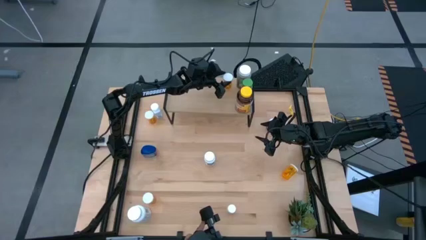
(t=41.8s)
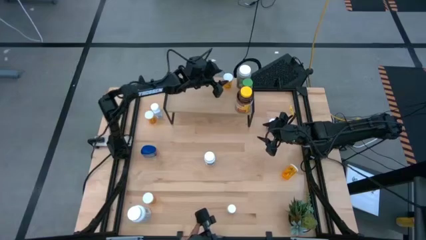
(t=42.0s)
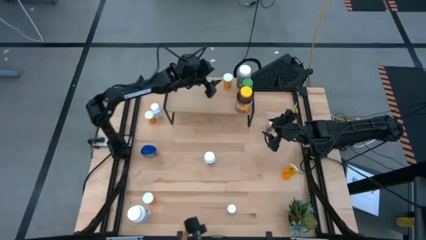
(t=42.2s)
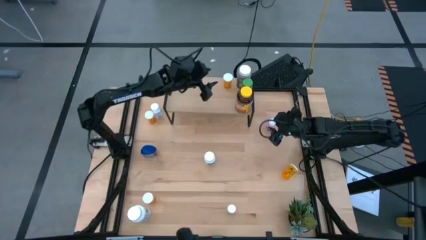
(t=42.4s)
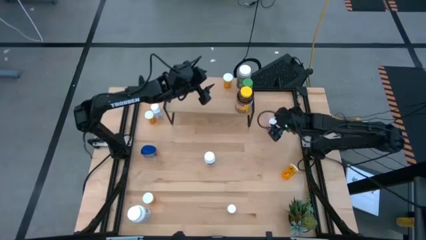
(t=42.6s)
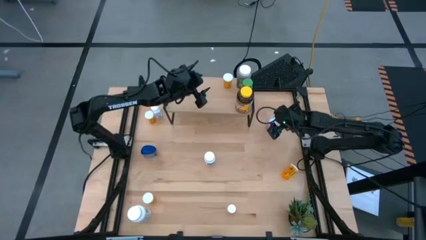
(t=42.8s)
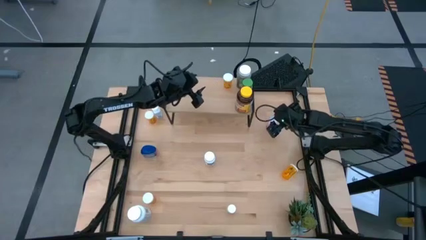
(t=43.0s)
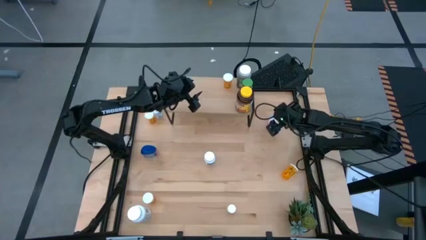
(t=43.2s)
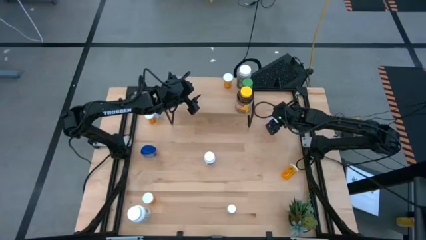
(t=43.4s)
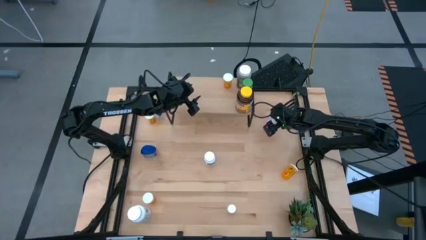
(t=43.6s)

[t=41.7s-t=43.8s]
Task: Pick and place medicine bottles onto shelf by color
Put the pink pill bottle on the shelf

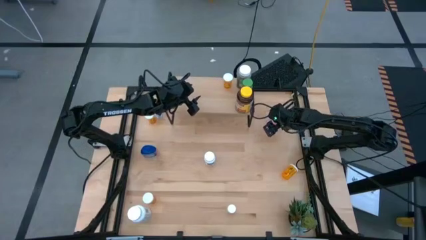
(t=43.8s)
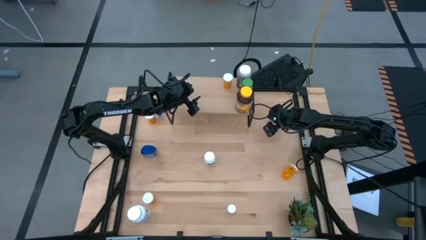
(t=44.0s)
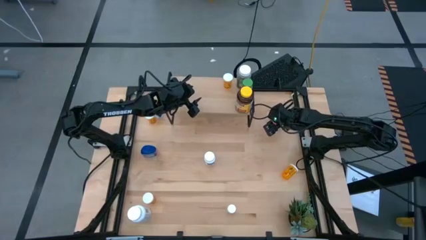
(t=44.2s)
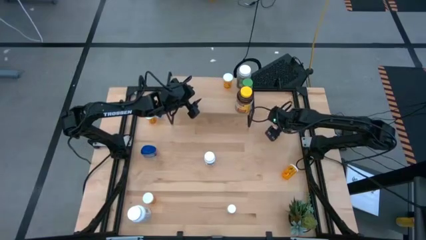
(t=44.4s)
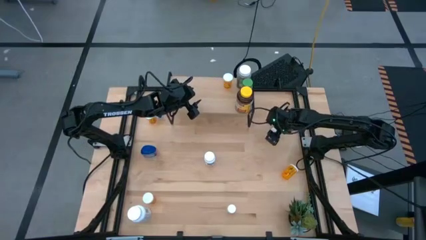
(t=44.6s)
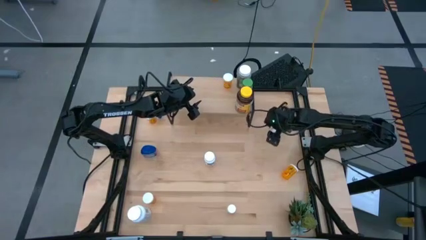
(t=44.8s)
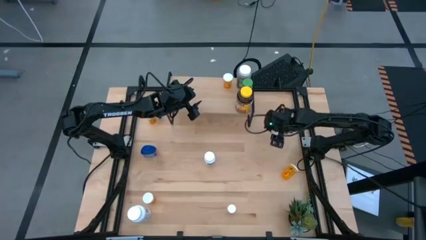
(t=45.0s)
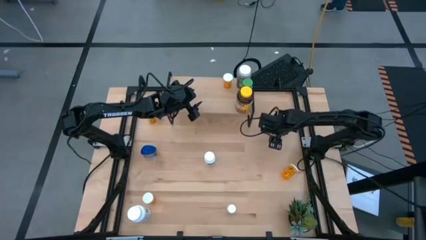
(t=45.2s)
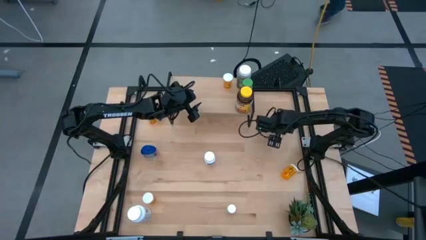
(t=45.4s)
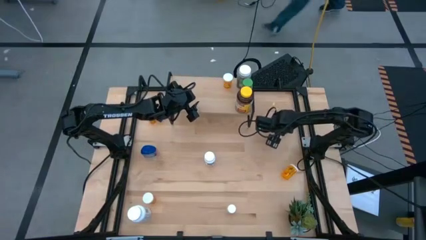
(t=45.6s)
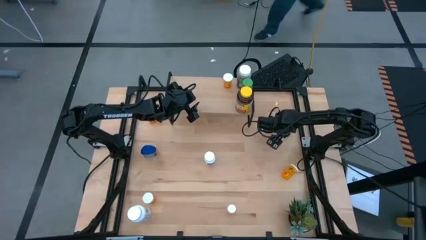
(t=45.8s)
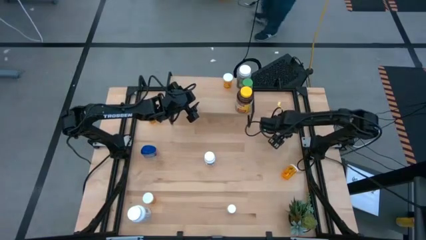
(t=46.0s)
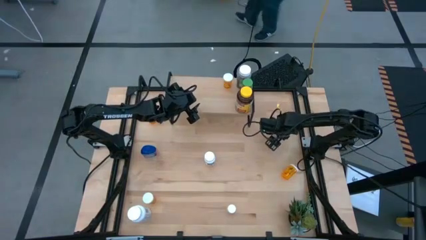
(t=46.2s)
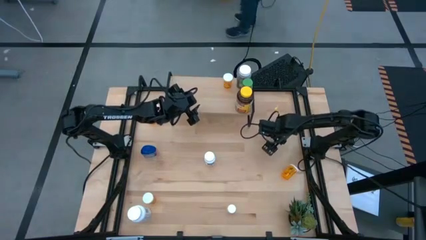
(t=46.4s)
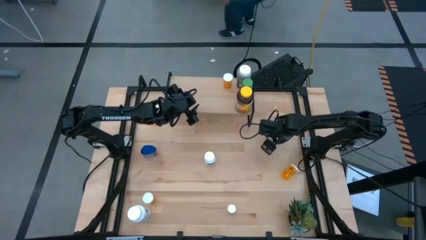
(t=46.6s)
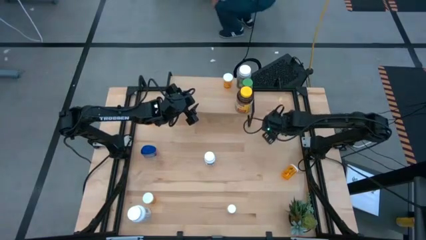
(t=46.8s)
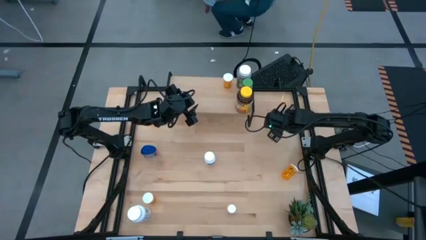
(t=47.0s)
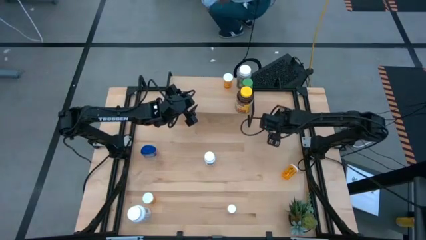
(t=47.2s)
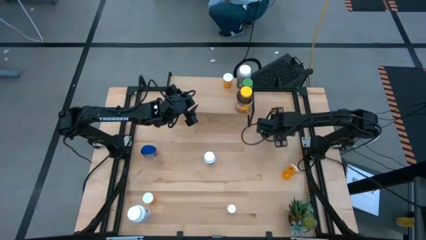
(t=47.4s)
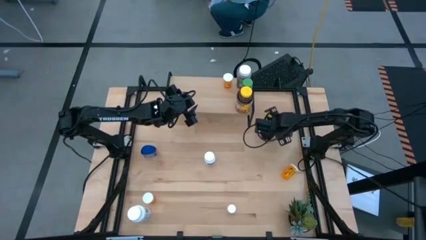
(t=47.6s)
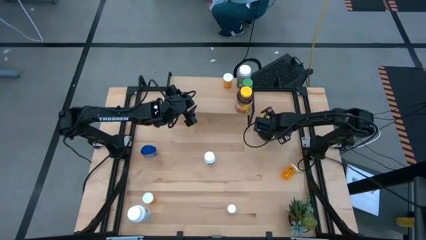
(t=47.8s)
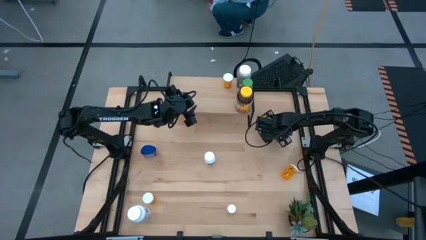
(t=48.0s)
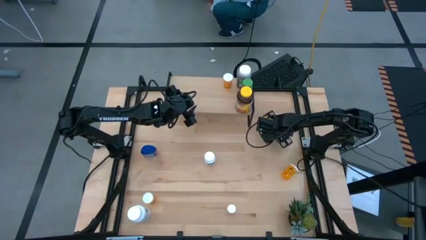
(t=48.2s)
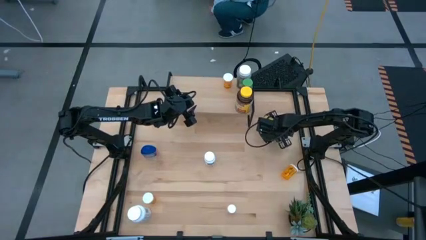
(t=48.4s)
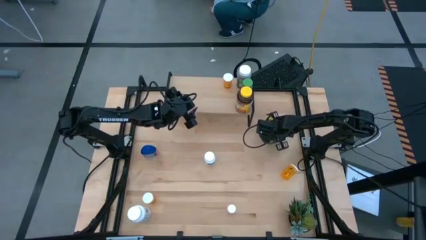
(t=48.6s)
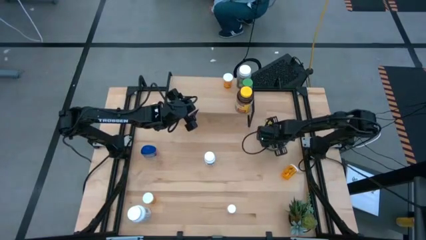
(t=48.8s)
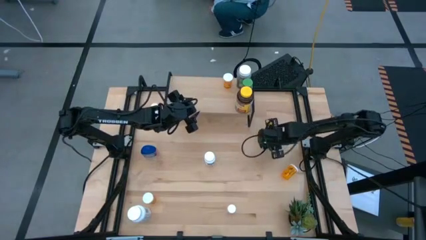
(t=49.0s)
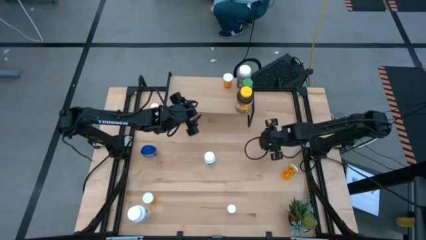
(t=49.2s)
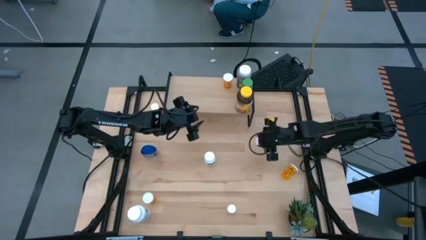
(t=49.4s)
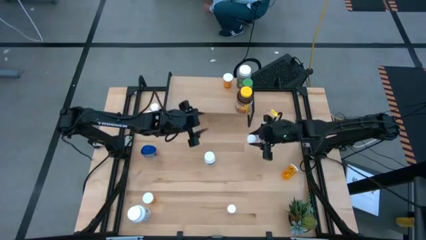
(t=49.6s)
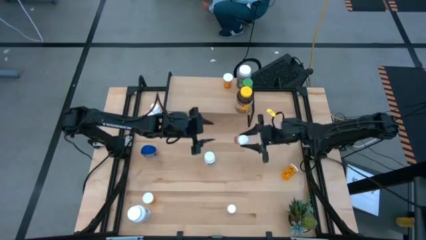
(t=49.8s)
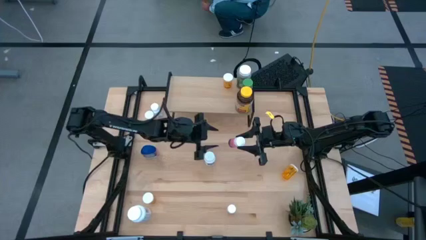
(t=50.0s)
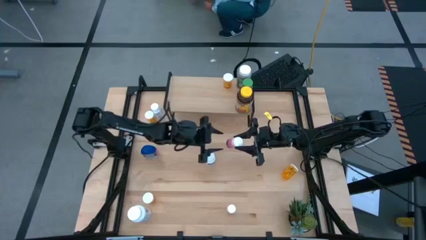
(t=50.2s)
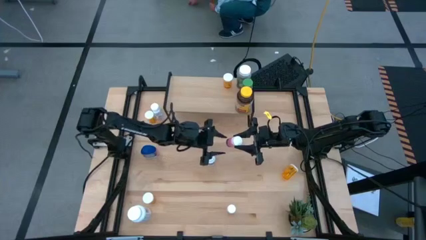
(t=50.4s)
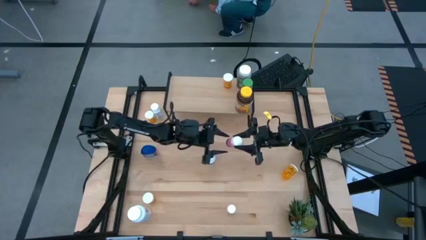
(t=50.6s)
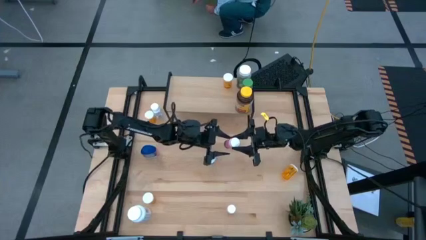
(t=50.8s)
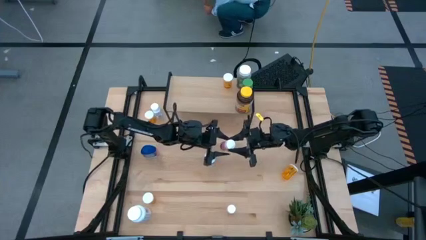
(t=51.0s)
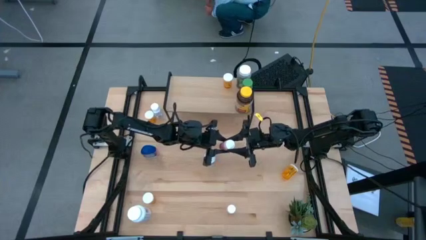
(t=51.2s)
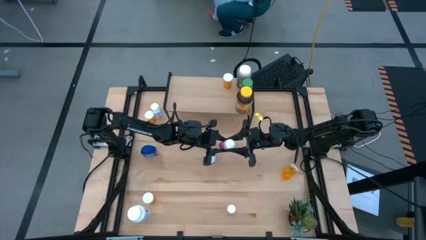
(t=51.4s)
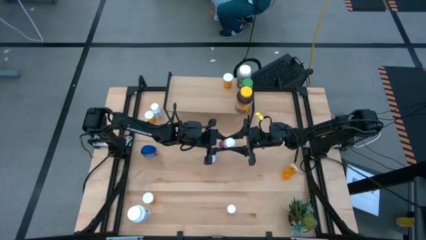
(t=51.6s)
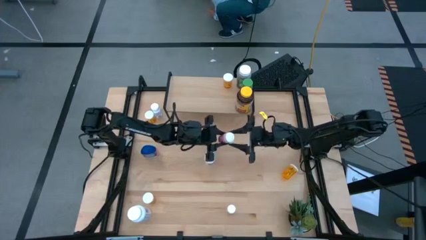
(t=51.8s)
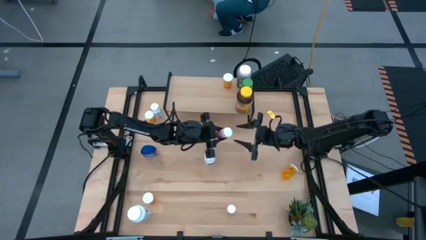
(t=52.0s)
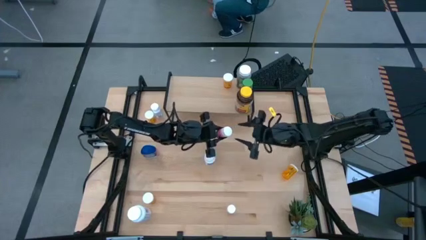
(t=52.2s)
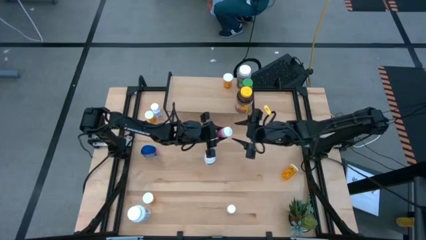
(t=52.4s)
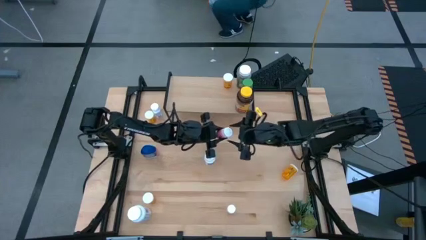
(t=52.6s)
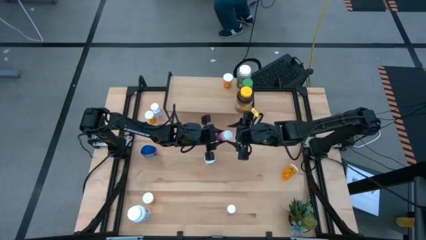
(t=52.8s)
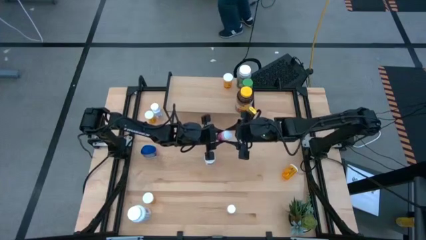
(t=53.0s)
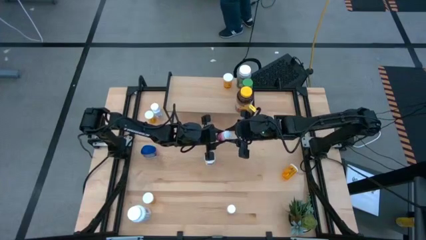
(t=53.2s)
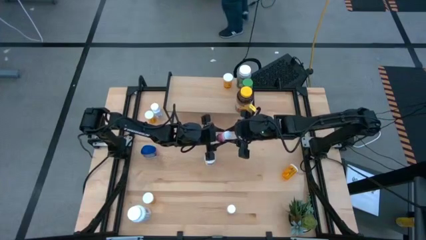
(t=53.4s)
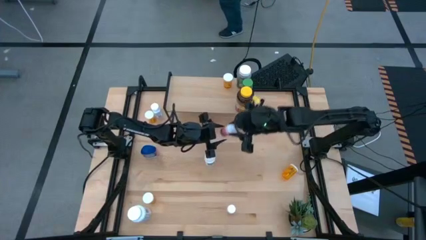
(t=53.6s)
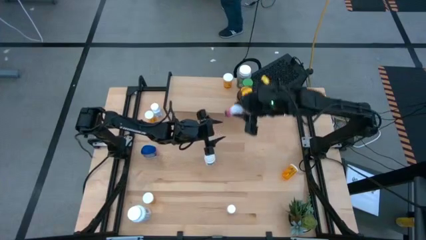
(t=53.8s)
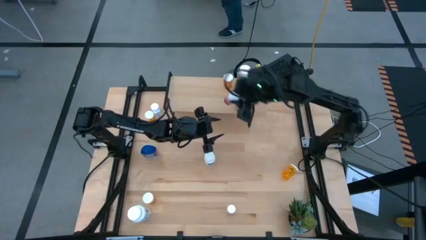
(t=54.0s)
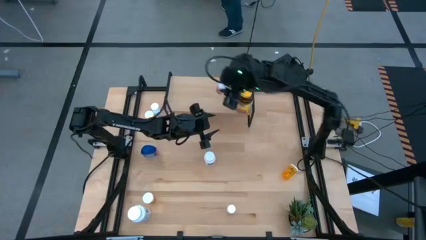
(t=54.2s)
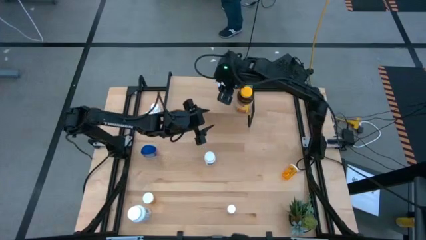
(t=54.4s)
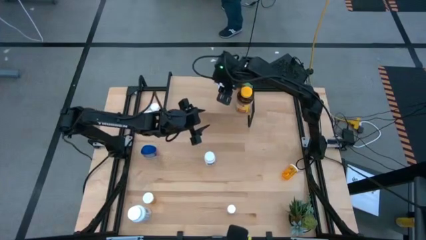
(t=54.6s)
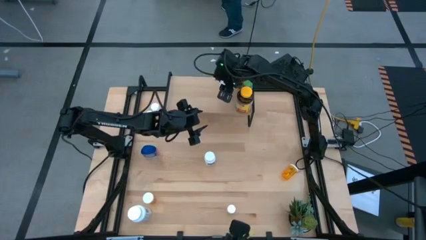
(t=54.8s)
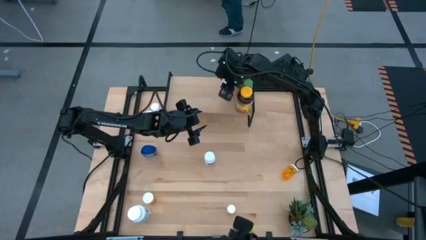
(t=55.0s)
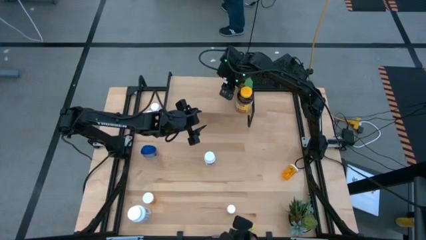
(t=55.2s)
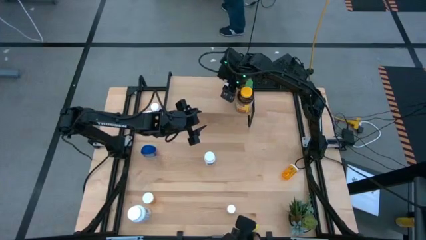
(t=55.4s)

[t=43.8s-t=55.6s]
Put the pink pill bottle on the shelf
